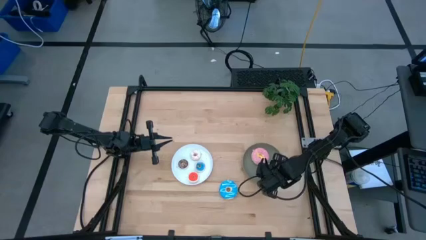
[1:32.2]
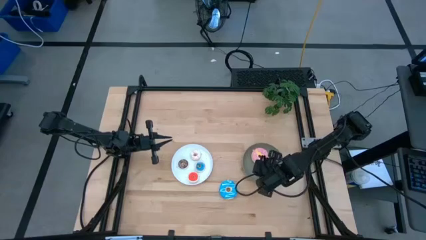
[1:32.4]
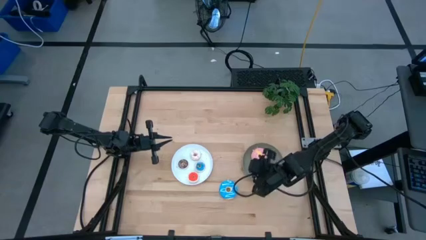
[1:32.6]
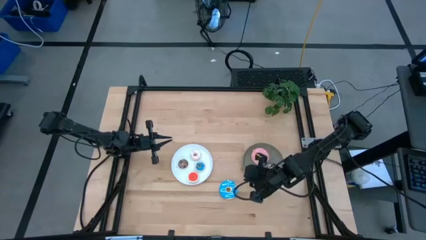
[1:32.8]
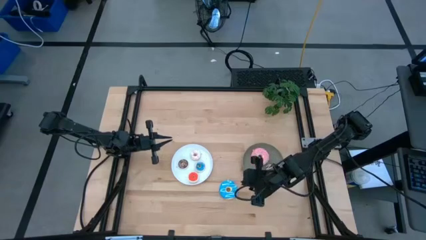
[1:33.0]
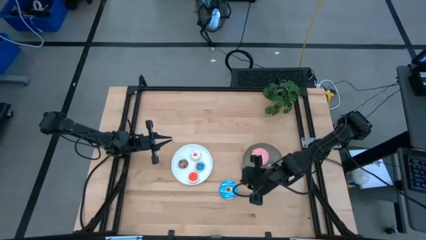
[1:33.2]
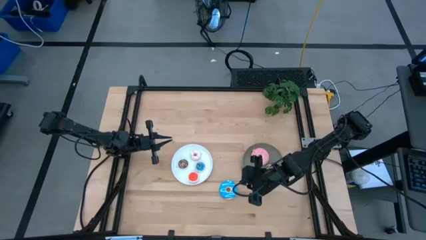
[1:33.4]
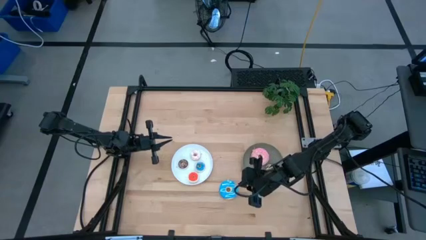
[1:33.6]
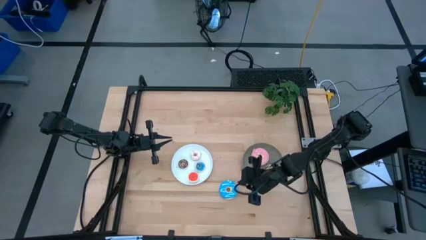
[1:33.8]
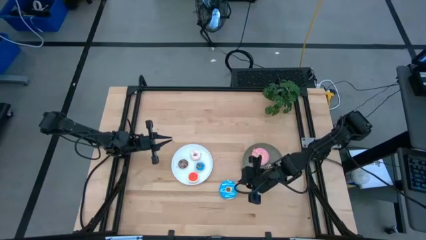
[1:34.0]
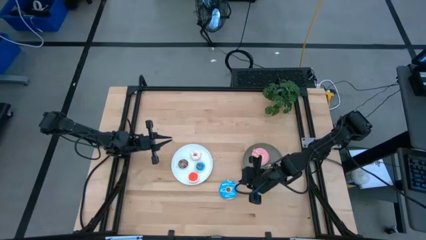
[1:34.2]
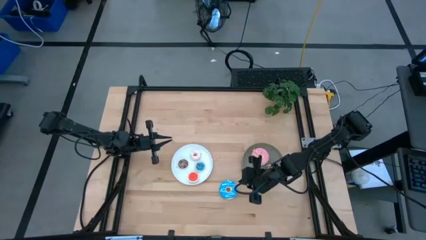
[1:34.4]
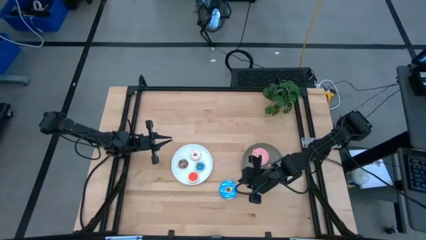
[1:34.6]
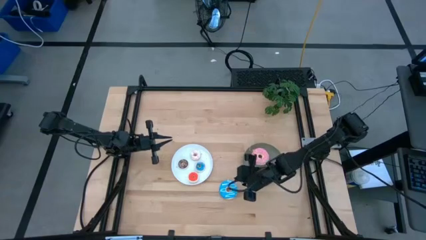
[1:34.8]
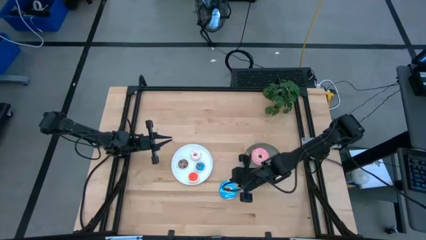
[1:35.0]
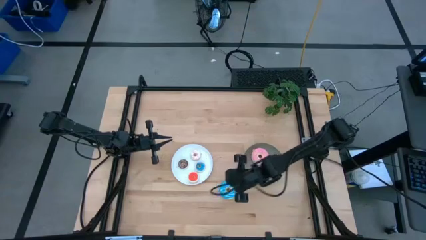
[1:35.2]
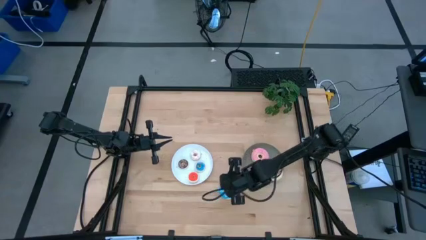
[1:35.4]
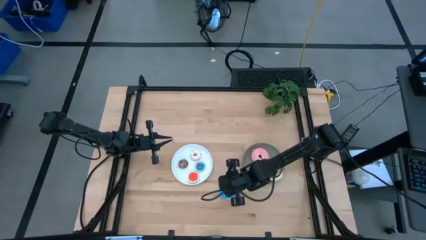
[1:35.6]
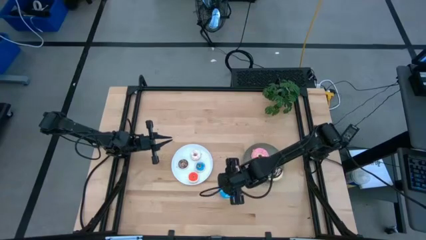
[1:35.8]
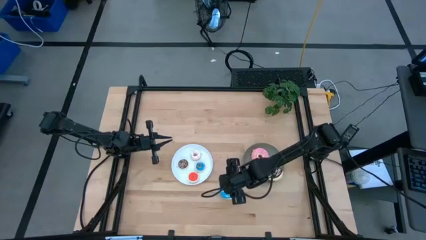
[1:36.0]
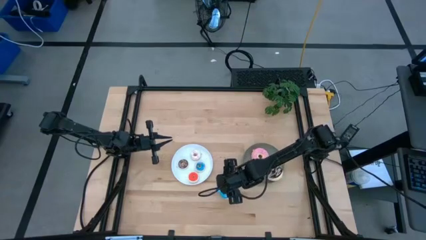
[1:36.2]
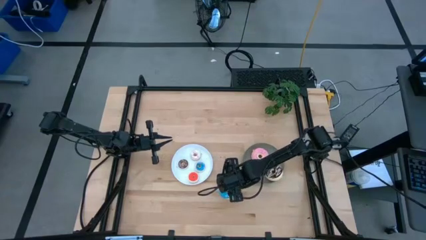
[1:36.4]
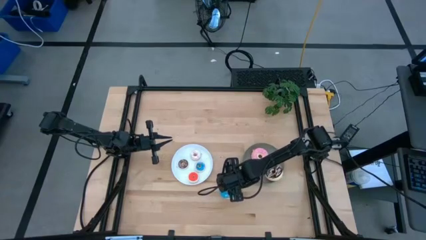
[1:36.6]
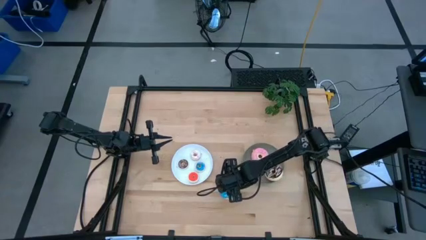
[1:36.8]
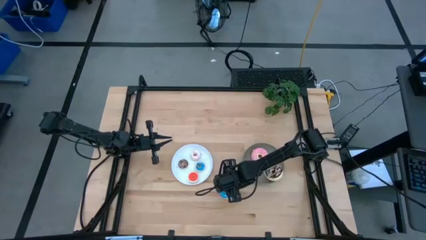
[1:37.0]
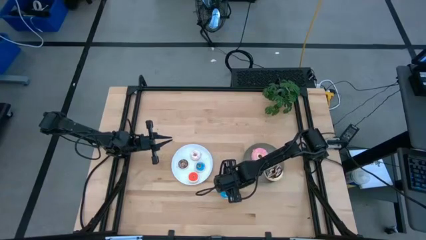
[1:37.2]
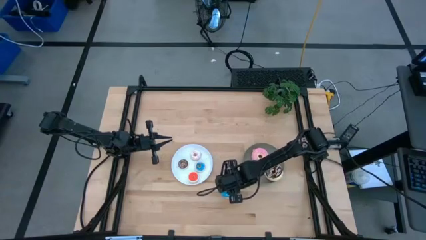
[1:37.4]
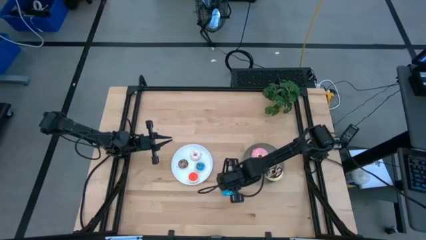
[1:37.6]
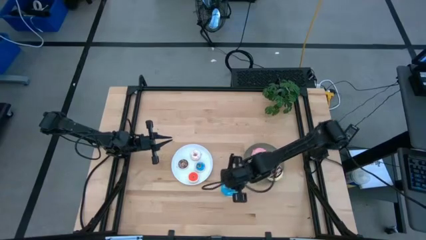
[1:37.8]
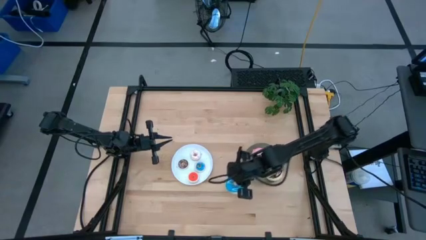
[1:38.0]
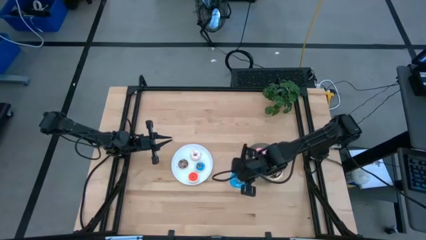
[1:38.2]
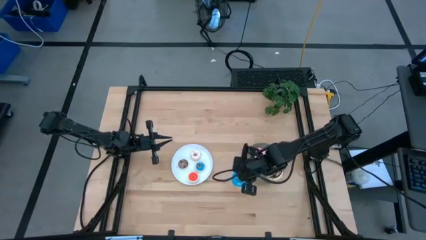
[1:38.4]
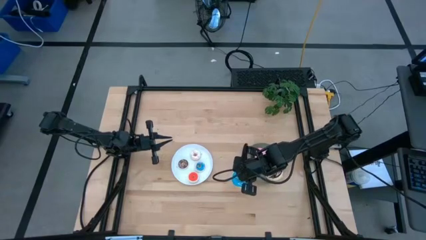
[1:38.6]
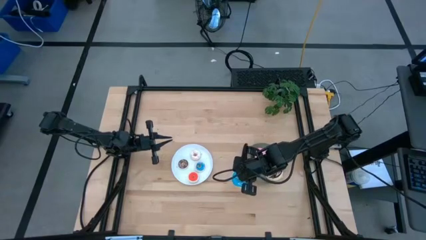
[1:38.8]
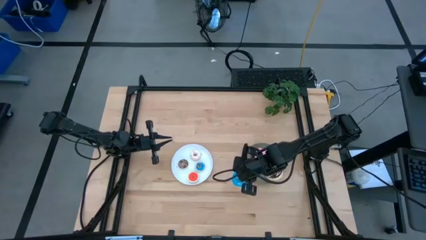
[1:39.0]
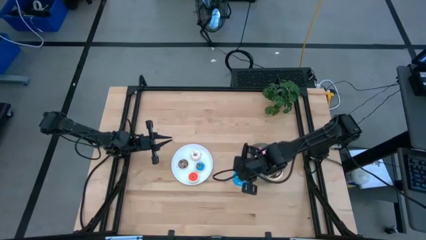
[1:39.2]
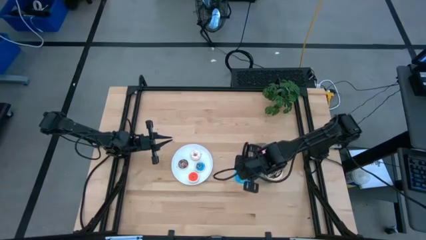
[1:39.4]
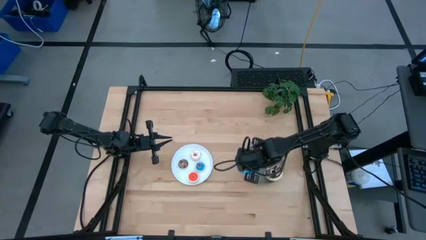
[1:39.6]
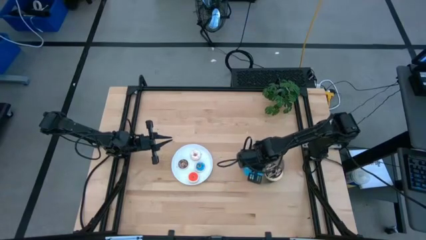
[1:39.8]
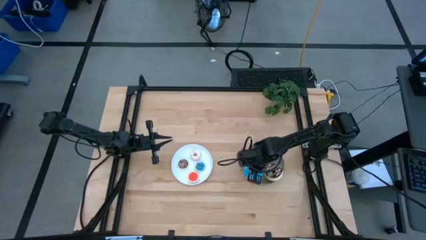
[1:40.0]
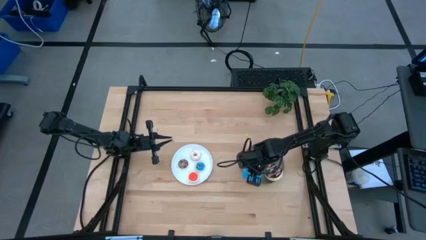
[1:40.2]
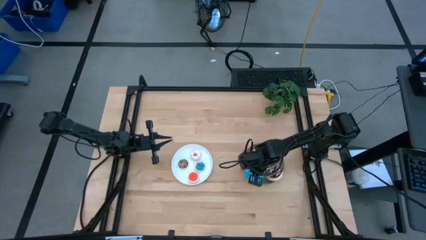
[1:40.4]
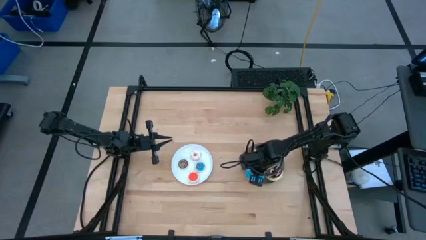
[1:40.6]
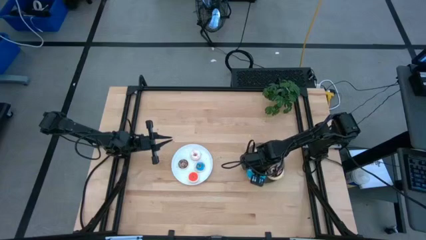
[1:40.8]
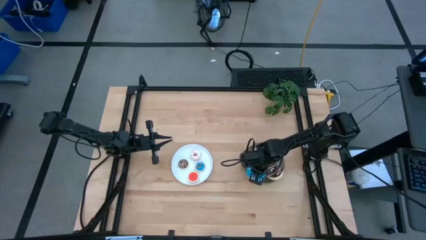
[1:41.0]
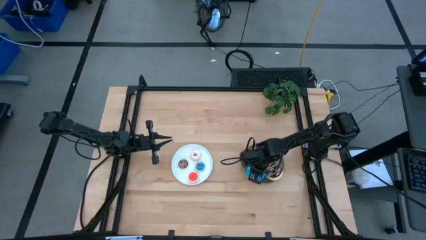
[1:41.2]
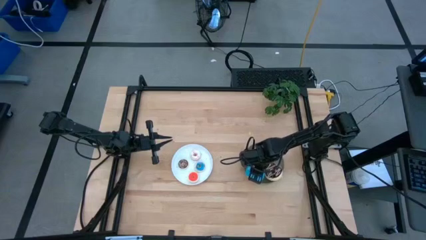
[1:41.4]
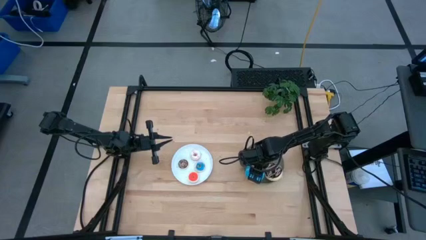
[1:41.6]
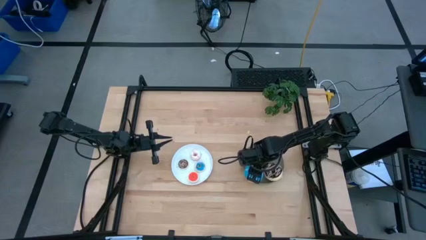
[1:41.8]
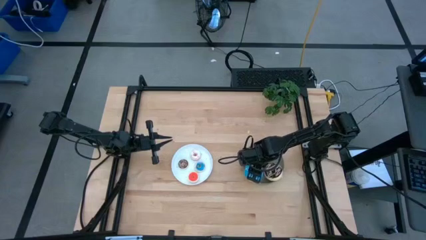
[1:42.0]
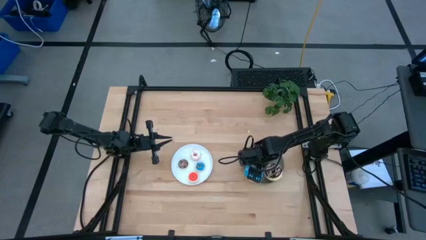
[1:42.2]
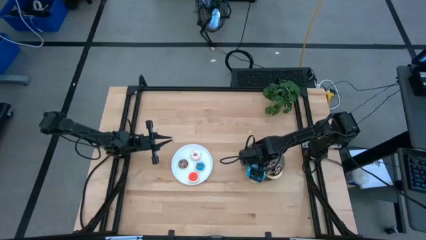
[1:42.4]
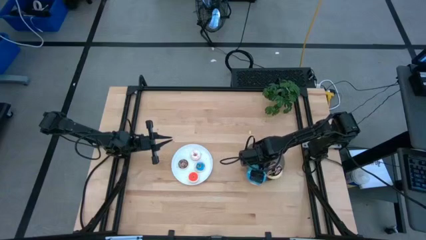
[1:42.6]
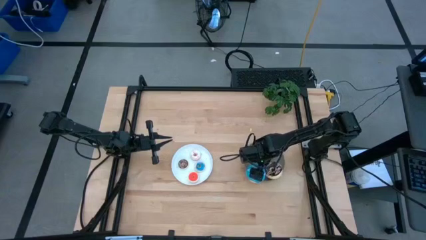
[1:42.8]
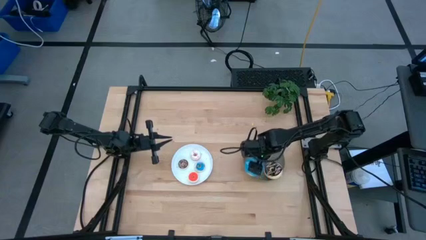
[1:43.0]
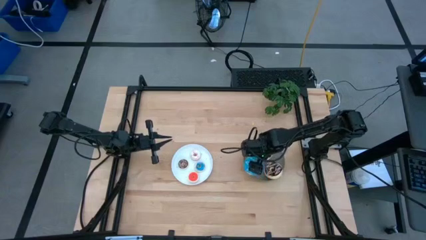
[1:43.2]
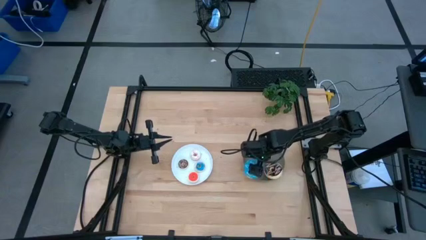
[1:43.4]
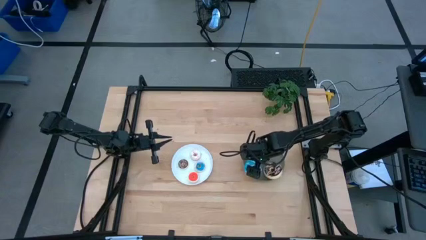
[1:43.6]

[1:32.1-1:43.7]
Task: Pick & Place donuts
Put the big blue donut on the green plate

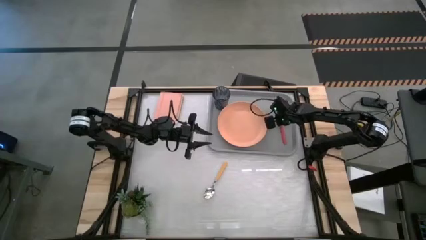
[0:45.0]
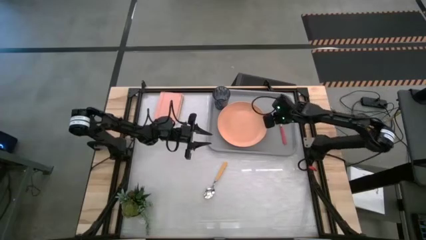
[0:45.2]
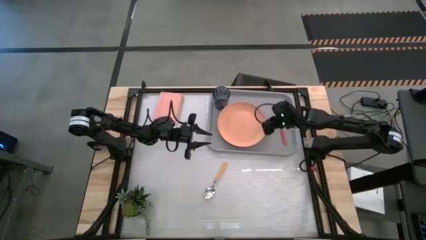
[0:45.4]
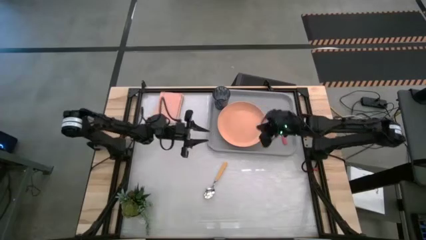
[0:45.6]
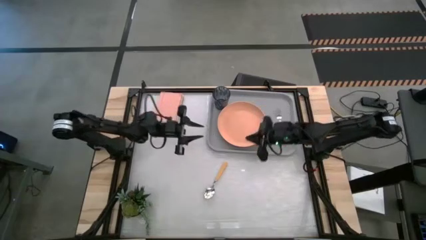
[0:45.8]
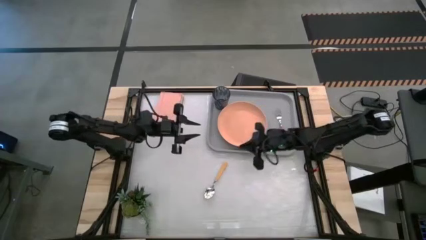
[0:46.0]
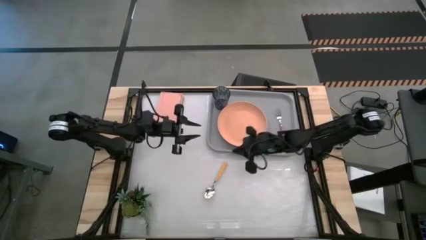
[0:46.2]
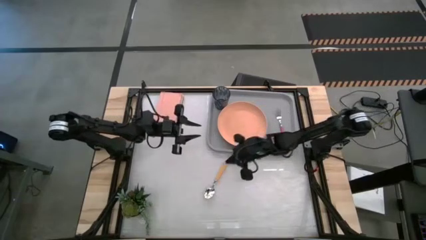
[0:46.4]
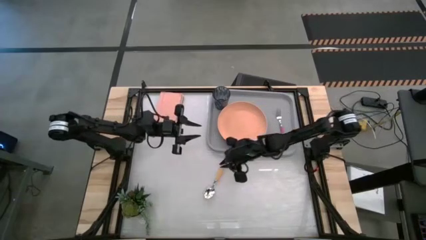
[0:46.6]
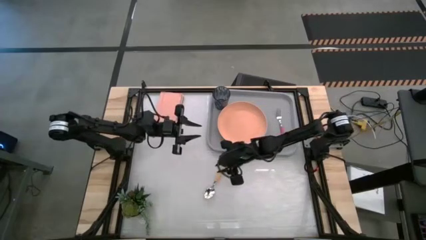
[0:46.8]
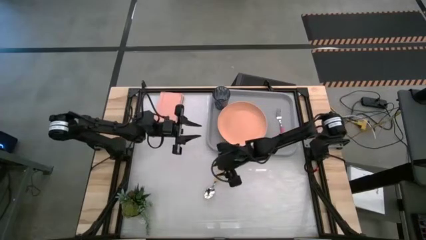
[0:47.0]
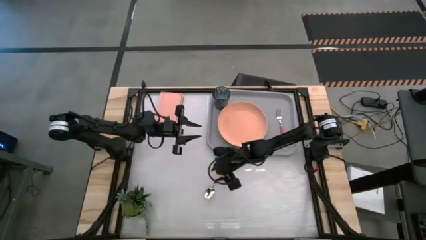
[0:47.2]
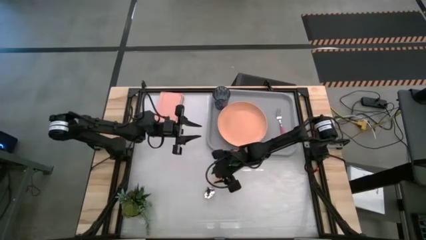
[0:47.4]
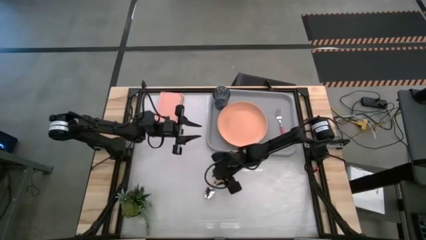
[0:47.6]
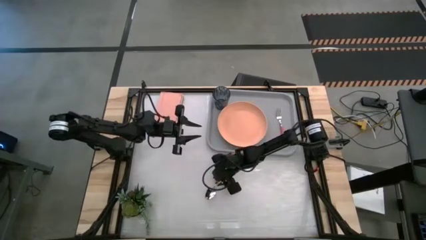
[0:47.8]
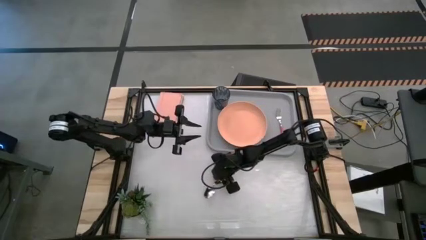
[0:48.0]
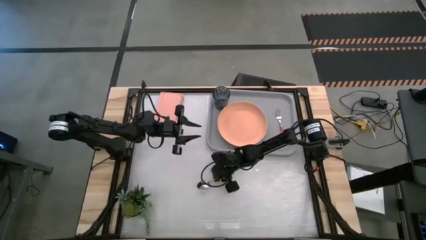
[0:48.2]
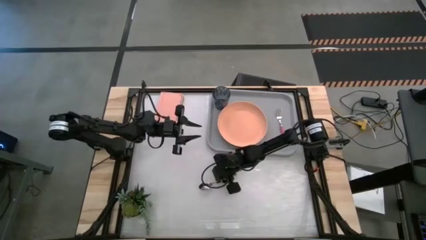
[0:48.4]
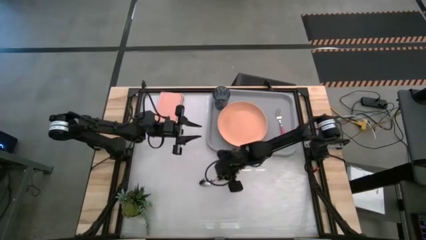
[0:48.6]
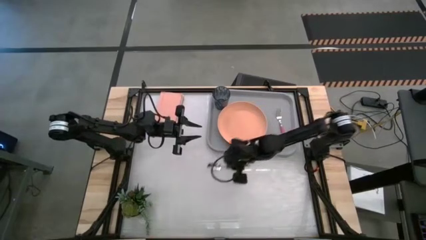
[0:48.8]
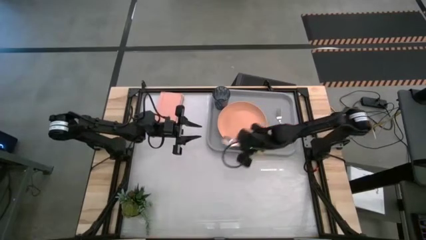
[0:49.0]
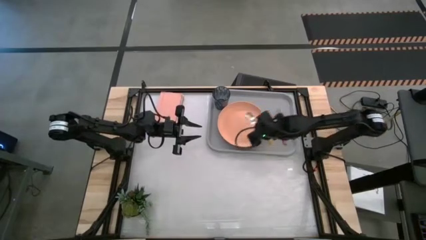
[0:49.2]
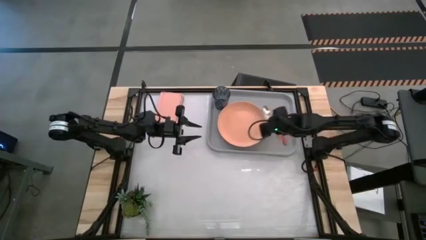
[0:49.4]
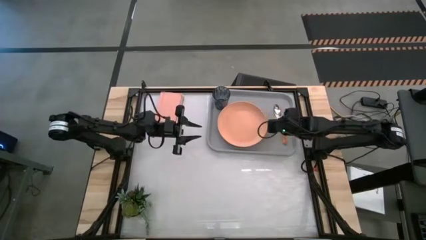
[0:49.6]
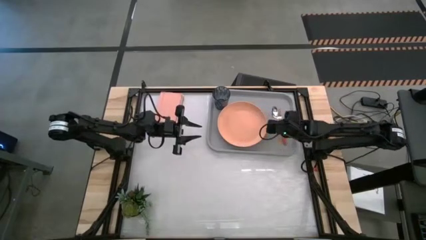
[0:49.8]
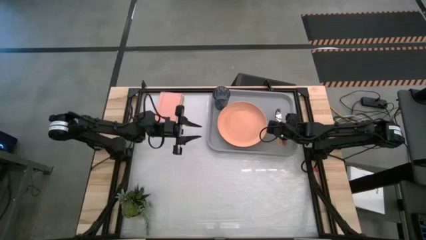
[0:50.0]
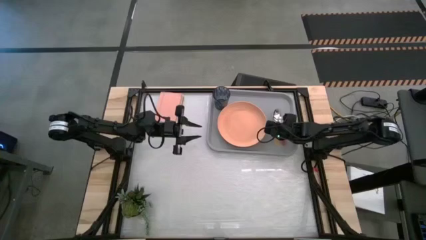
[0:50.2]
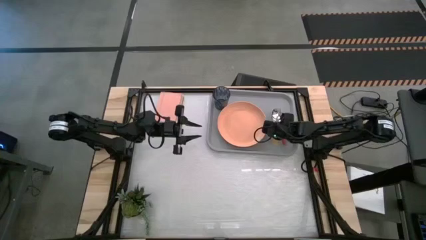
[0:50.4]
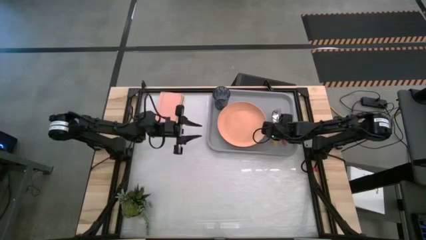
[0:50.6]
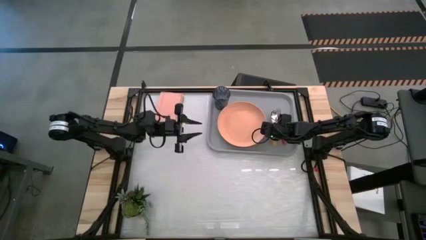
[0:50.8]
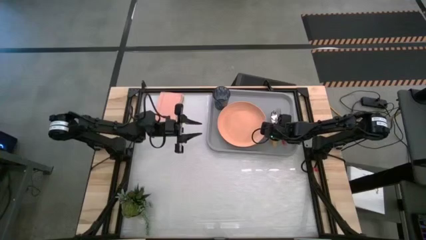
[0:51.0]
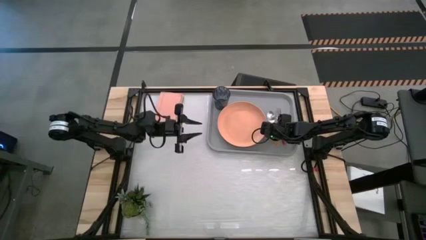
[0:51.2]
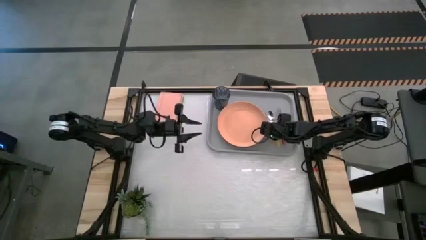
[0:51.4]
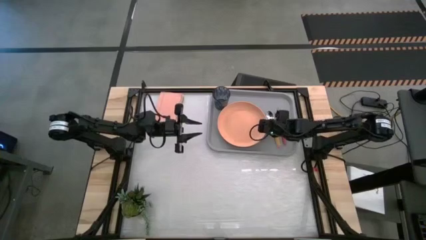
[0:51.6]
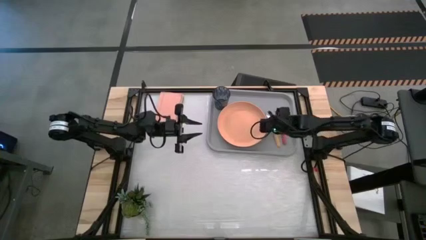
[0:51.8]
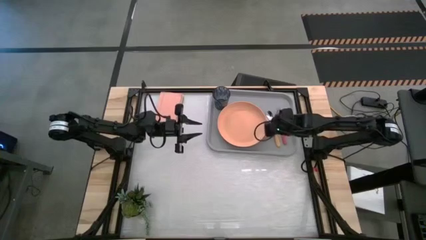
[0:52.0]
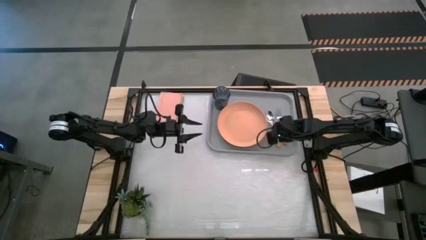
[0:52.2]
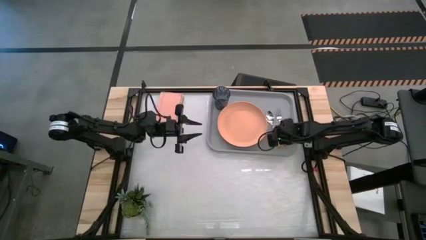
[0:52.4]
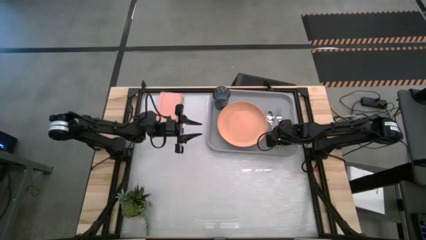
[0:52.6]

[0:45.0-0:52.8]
Task: Pick and place plate/cup/fork/spoon on tray
Put the yellow spoon on the right of the gray serving tray
